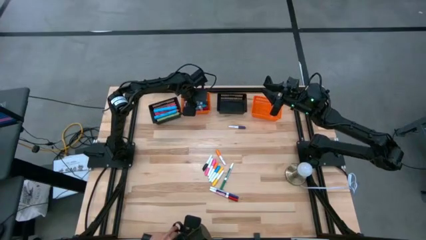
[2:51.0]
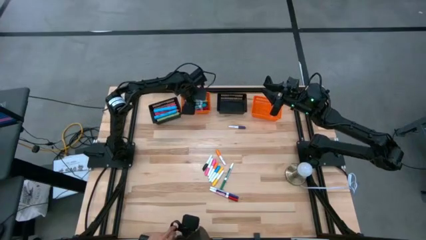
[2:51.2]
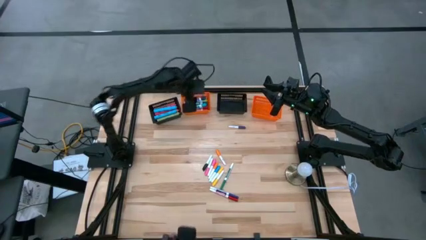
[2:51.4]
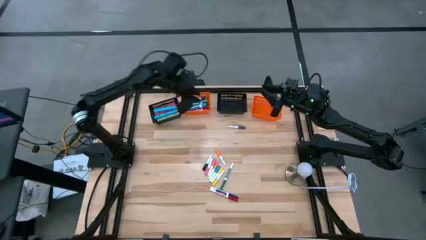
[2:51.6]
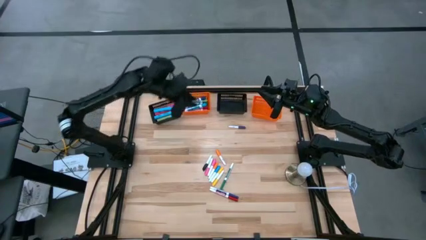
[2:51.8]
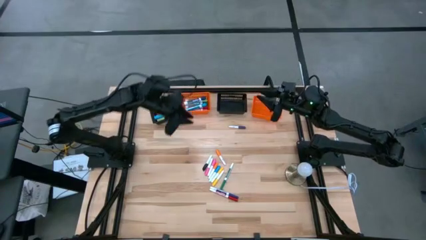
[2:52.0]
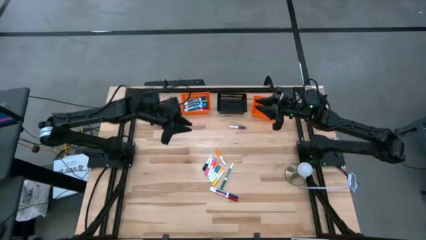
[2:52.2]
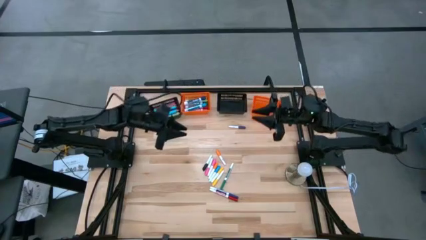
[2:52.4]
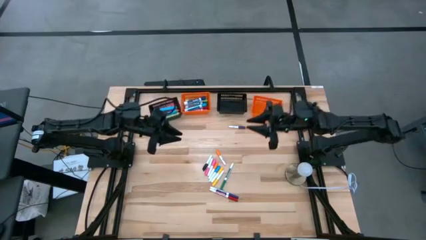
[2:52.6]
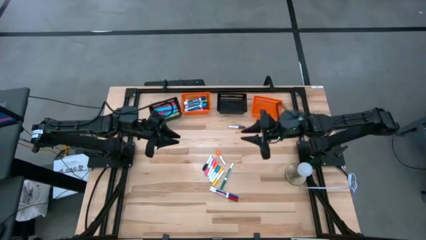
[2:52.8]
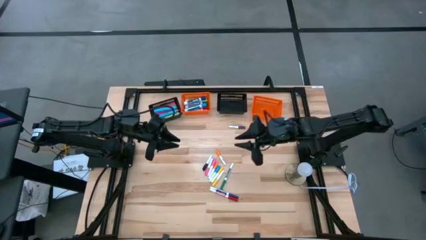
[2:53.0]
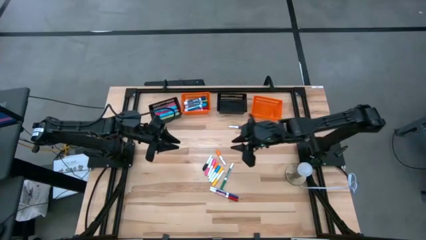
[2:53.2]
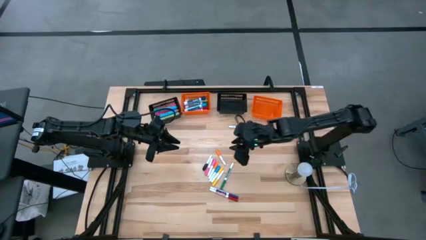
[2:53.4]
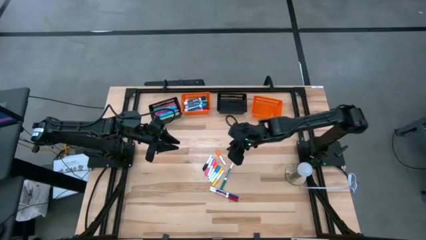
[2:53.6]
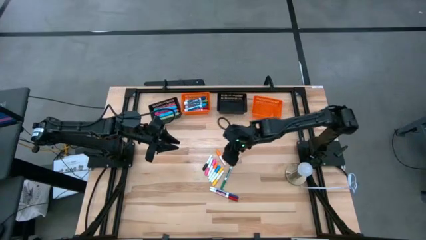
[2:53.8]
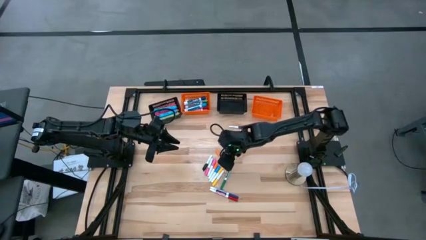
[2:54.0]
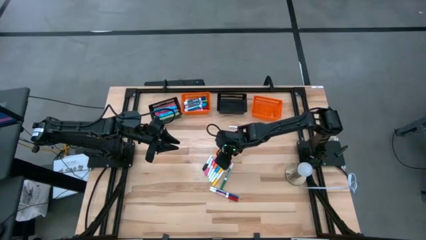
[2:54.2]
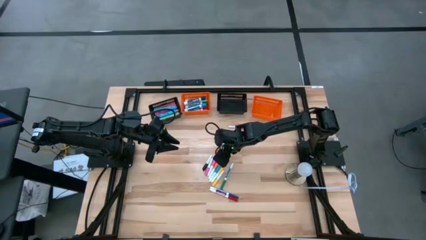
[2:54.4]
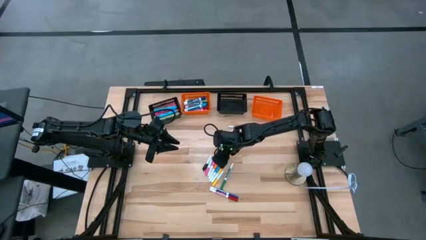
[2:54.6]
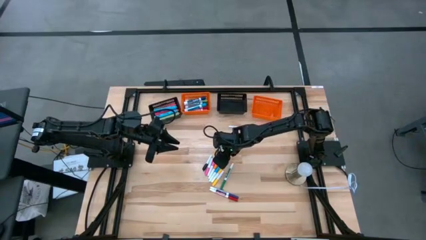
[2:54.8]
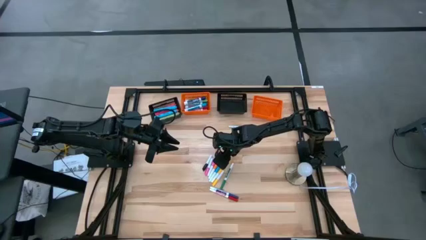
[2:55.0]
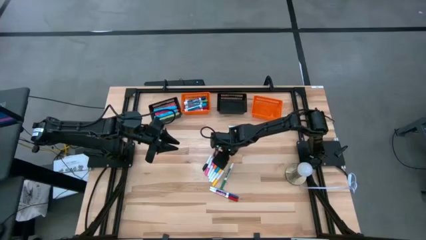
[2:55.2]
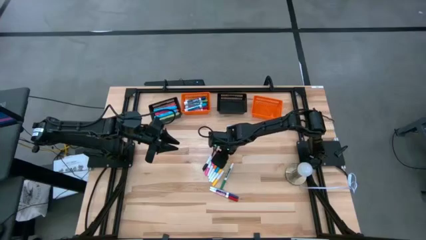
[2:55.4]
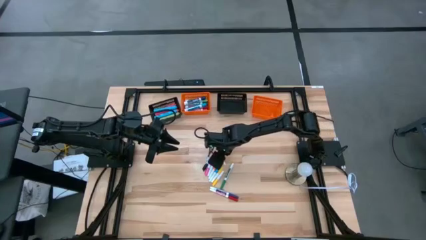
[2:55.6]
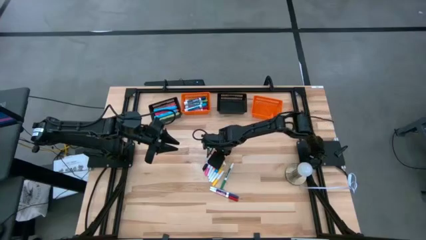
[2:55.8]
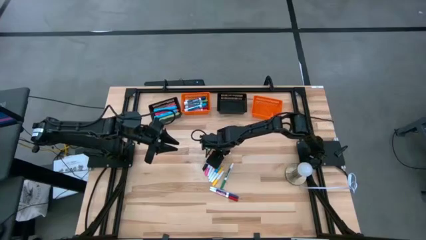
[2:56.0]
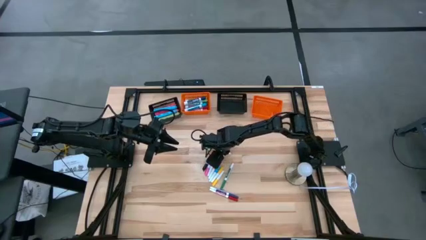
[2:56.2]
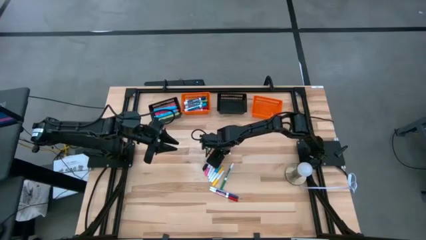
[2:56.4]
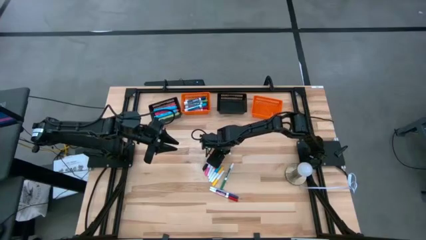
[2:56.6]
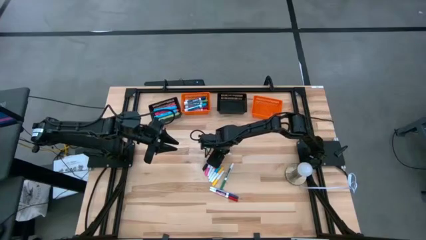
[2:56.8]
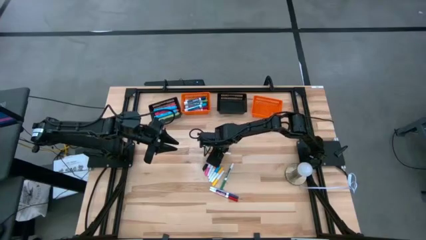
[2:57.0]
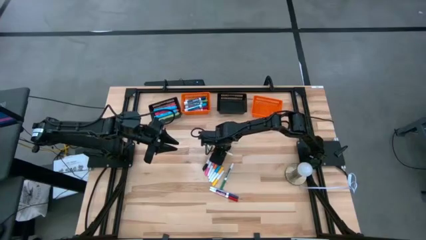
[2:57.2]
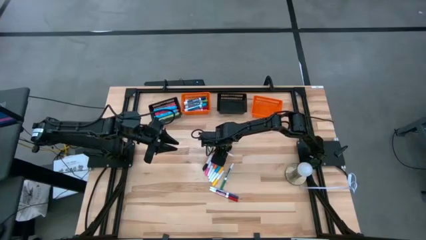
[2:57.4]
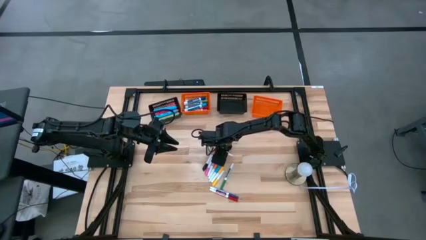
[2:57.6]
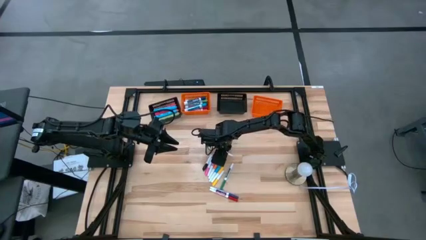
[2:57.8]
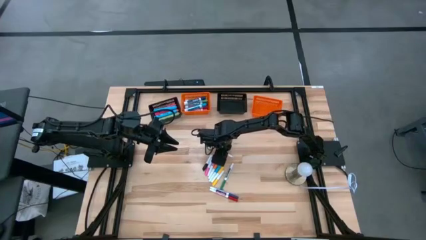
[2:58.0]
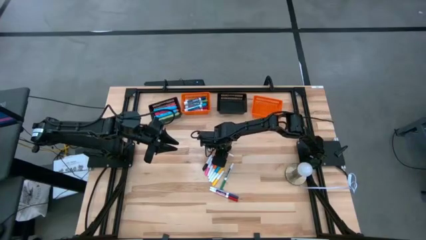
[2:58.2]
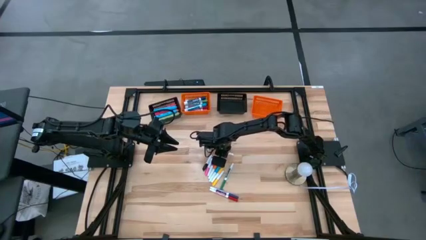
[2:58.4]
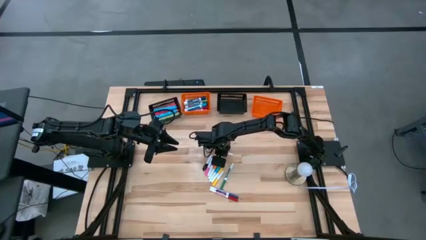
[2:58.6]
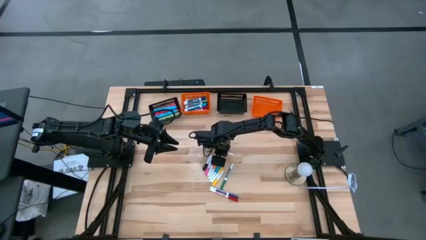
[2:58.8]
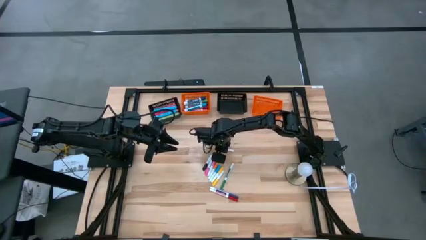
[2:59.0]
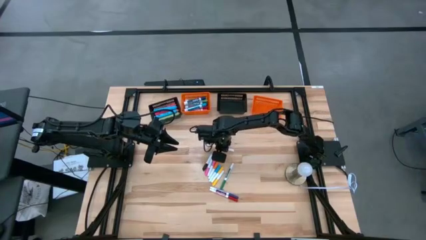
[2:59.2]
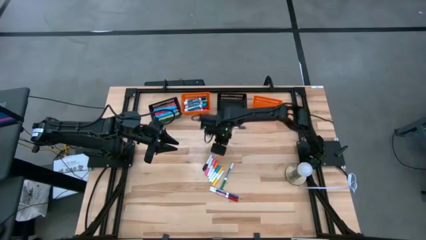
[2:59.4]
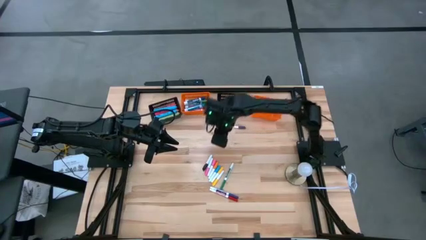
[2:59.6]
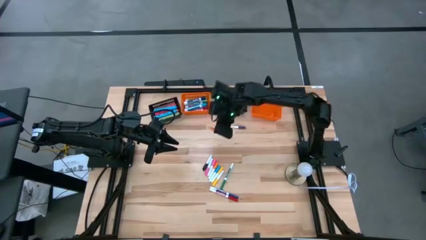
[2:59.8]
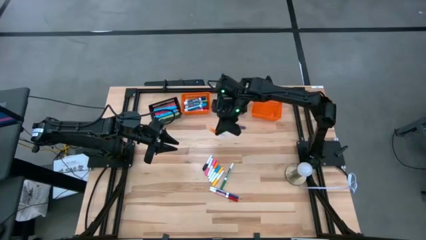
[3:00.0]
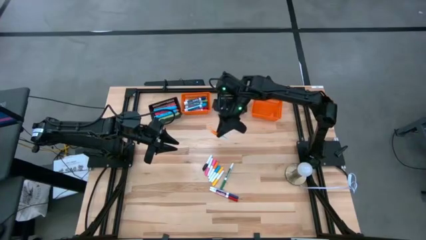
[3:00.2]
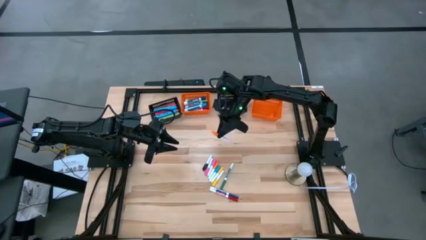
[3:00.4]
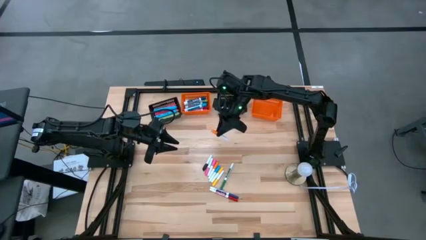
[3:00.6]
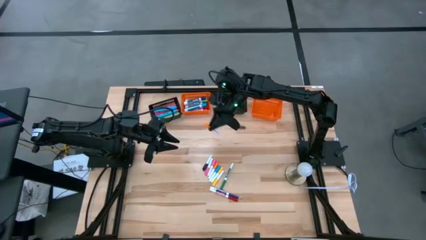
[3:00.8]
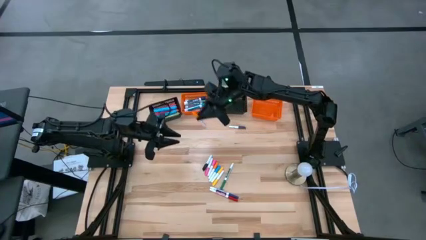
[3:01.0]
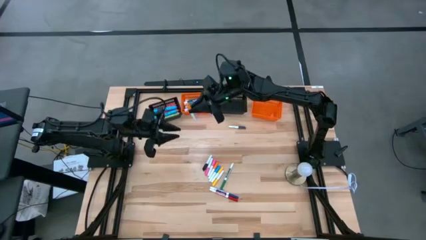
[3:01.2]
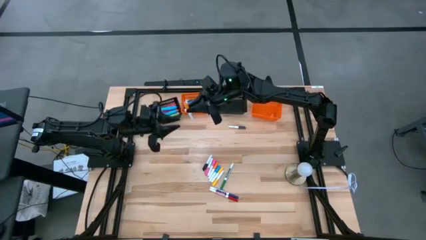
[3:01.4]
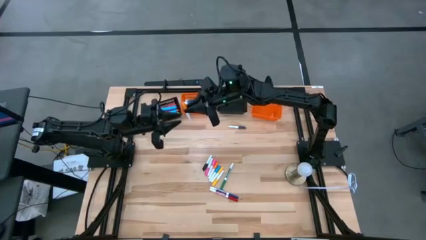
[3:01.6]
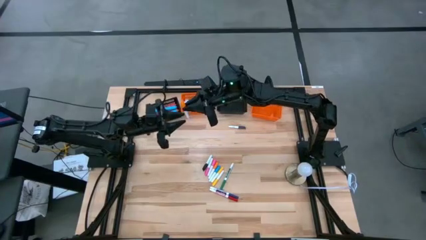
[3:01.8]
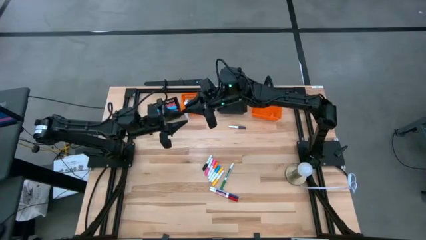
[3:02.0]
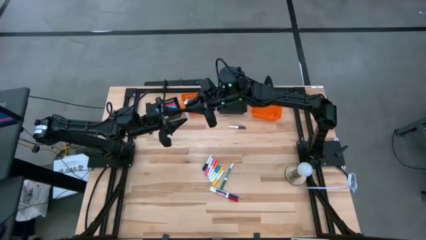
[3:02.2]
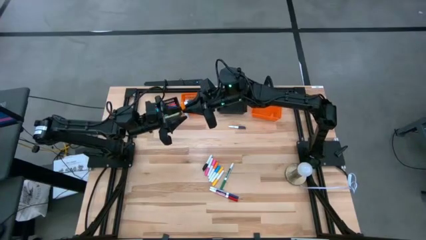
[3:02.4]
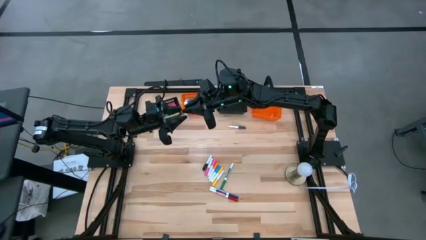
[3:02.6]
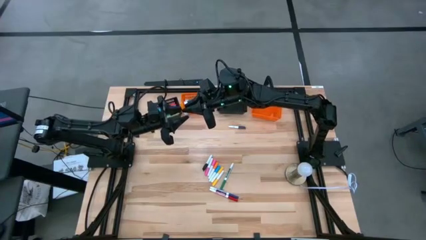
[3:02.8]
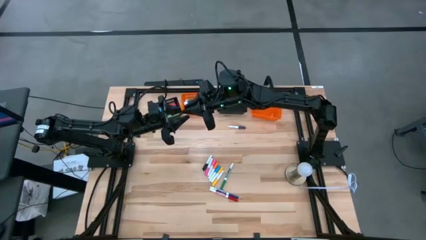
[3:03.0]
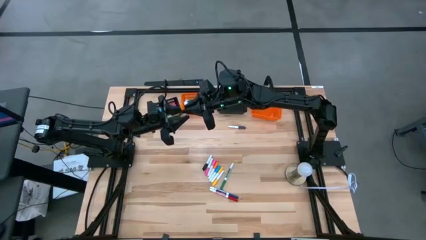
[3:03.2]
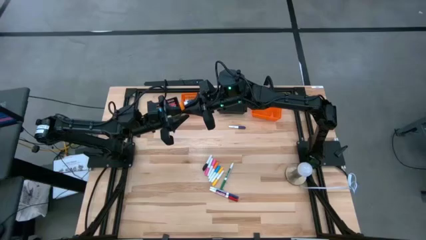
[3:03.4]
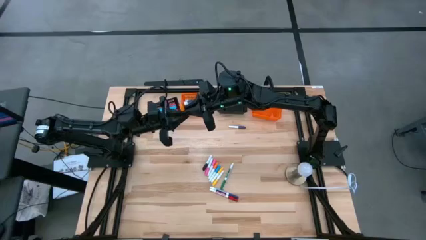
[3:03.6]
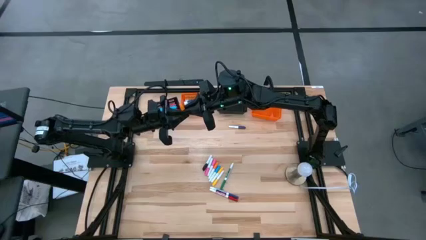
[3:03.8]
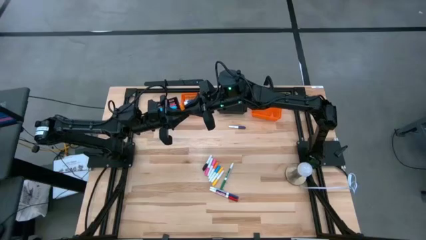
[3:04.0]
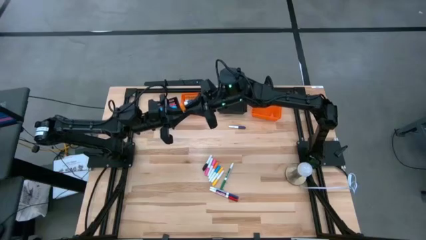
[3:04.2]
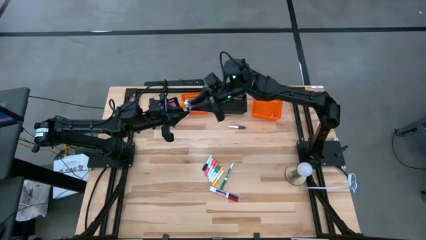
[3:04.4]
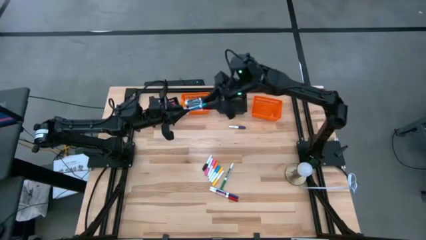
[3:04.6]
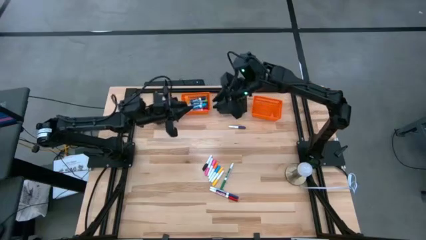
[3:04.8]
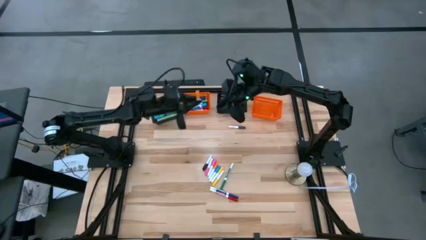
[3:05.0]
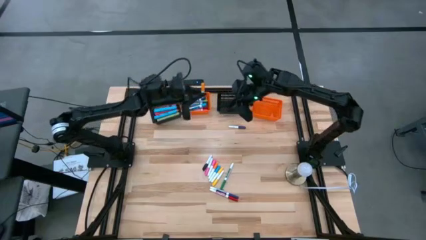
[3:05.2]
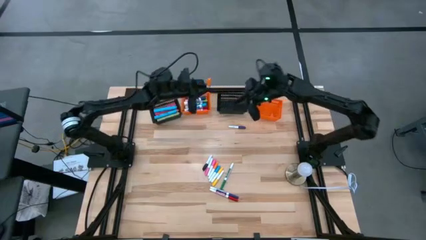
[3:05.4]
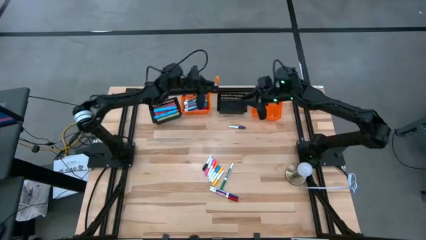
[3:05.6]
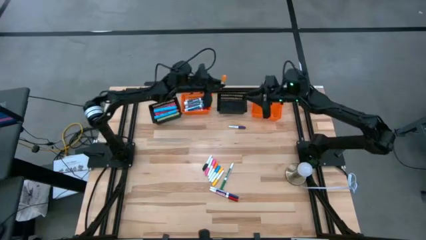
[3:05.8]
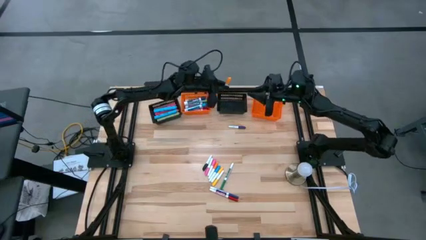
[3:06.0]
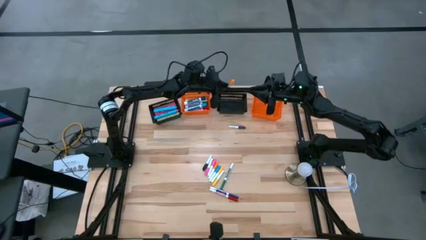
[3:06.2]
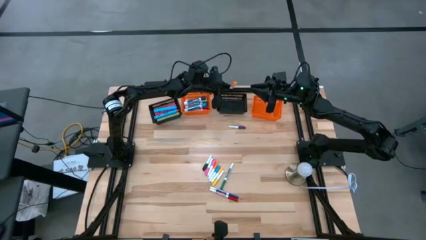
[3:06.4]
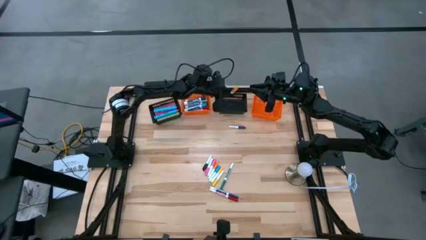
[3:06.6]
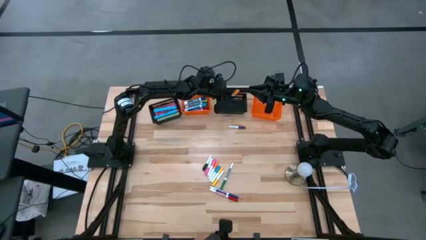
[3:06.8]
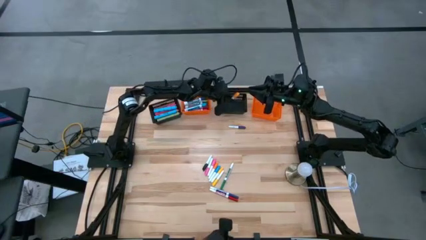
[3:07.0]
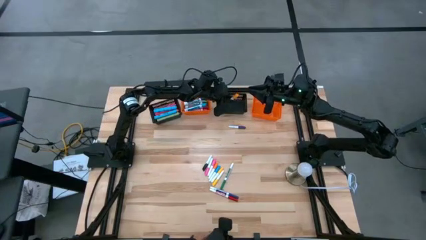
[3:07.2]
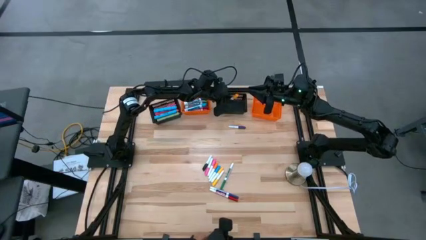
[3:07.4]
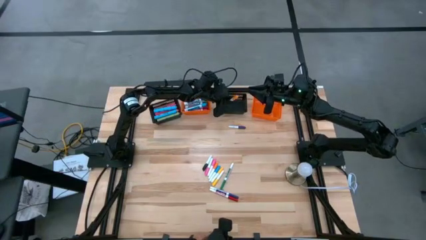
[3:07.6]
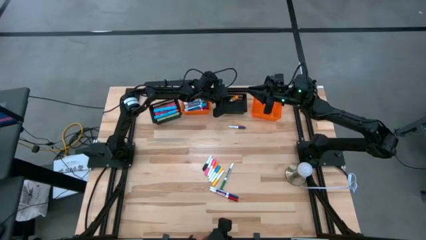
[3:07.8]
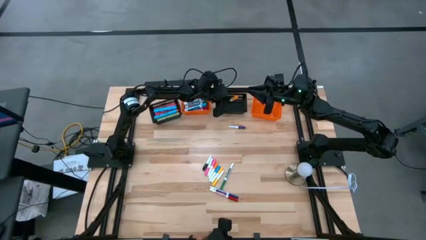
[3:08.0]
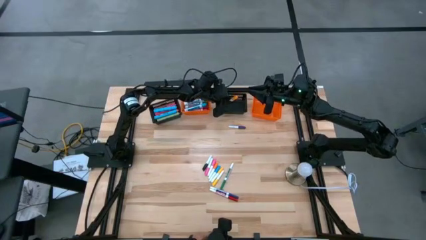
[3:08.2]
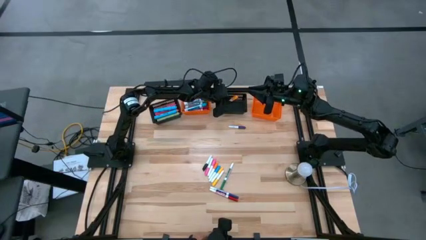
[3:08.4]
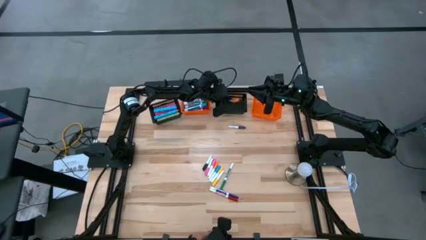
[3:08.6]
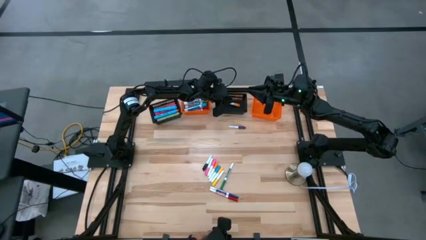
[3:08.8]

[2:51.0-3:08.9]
Task: Pick & Place Markers
Put the top orange mini highlighter into the right black bin
